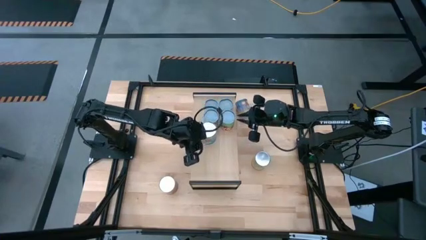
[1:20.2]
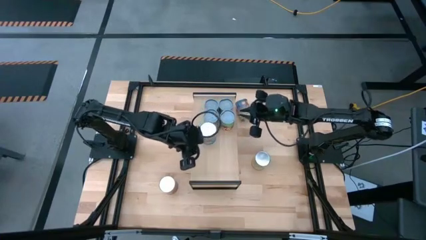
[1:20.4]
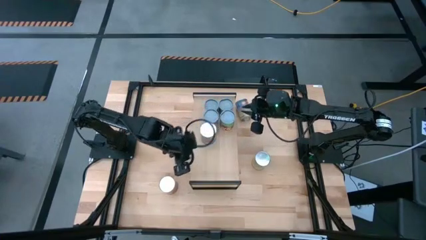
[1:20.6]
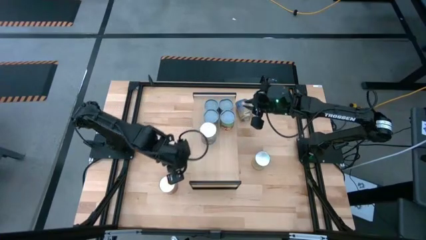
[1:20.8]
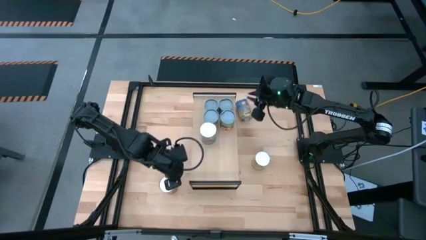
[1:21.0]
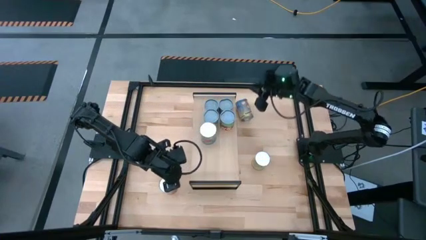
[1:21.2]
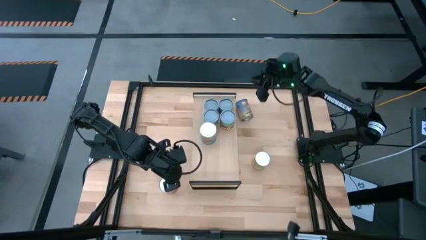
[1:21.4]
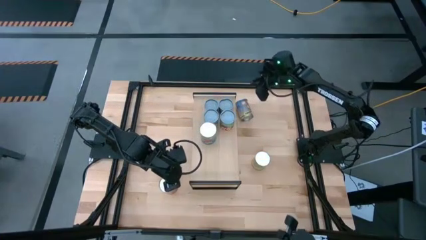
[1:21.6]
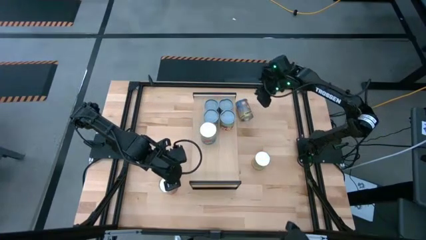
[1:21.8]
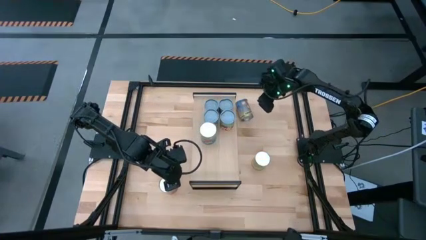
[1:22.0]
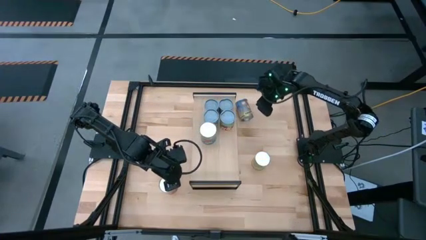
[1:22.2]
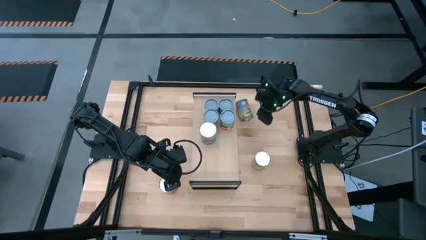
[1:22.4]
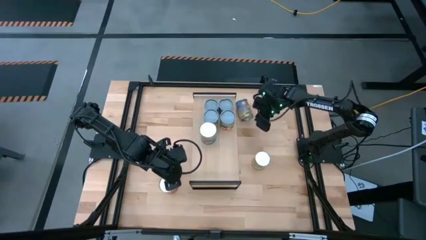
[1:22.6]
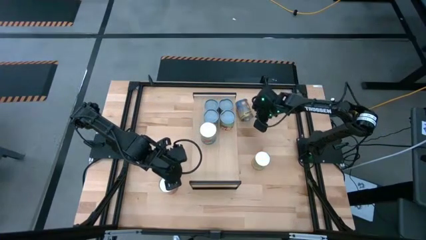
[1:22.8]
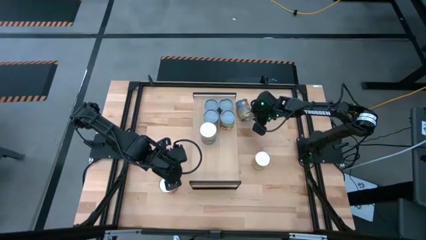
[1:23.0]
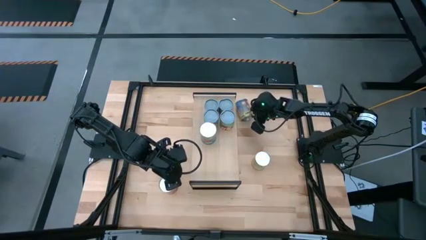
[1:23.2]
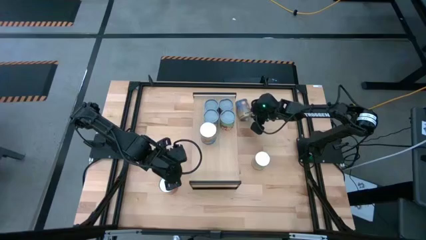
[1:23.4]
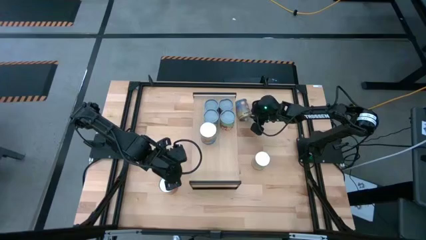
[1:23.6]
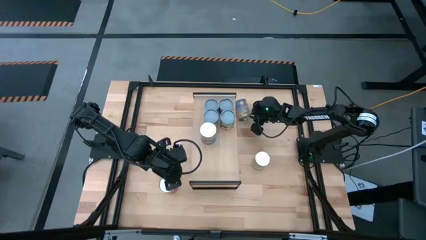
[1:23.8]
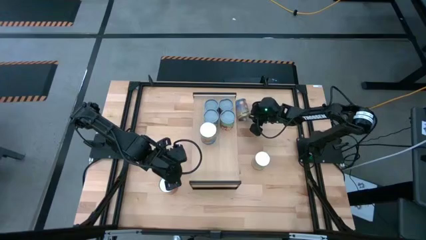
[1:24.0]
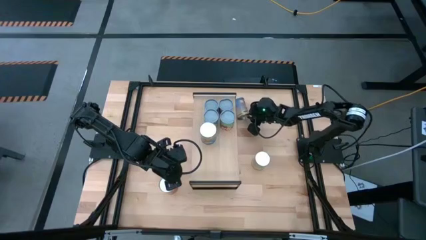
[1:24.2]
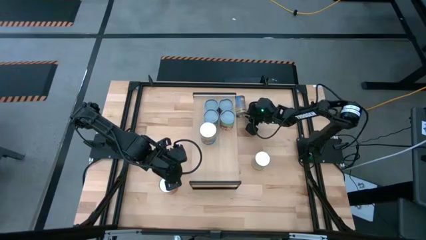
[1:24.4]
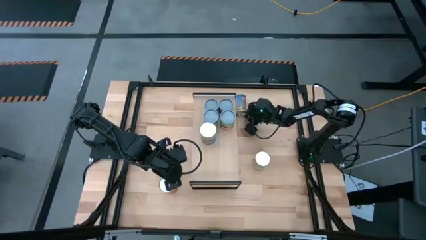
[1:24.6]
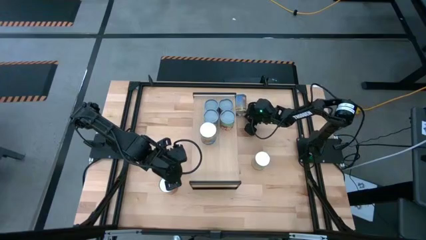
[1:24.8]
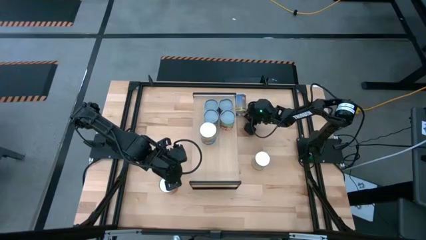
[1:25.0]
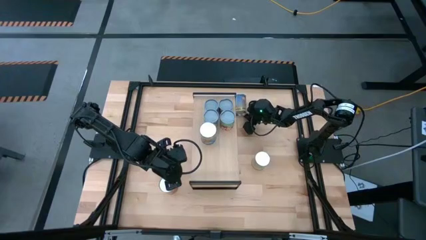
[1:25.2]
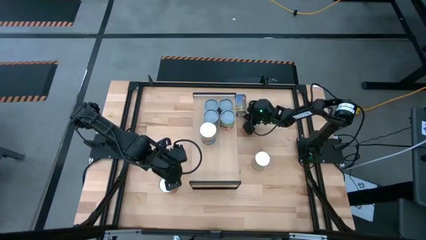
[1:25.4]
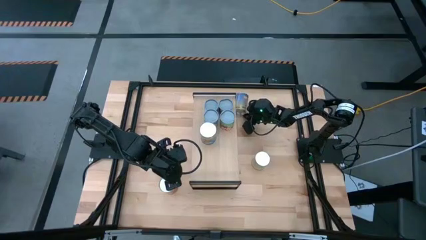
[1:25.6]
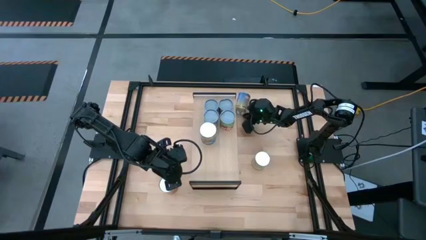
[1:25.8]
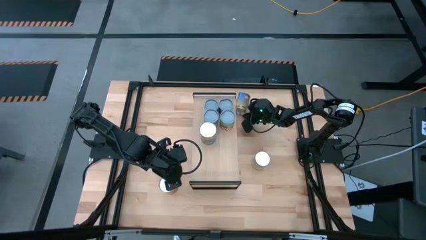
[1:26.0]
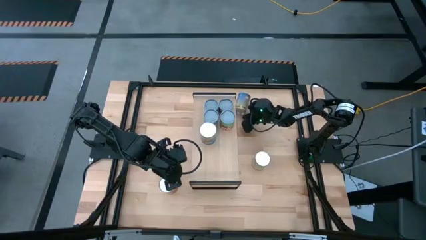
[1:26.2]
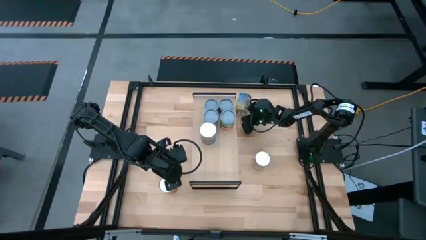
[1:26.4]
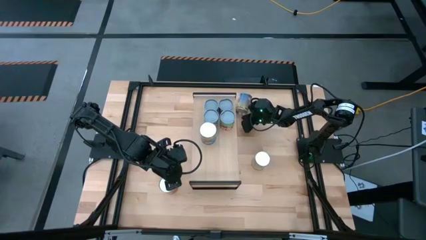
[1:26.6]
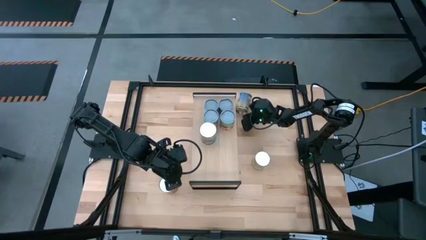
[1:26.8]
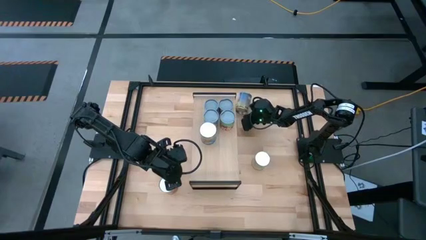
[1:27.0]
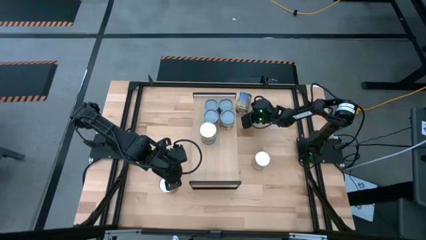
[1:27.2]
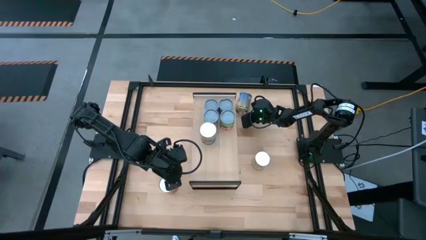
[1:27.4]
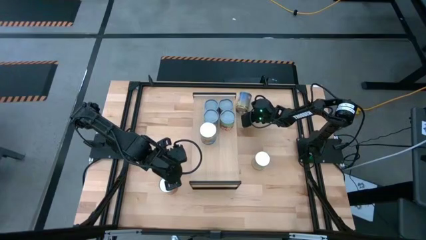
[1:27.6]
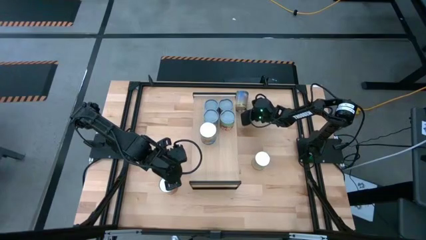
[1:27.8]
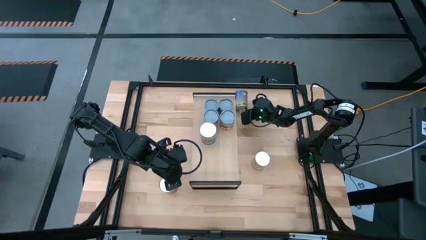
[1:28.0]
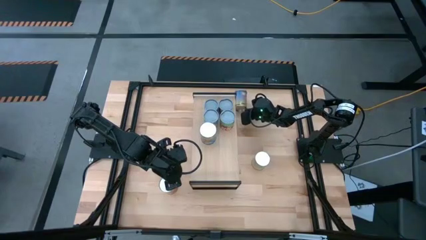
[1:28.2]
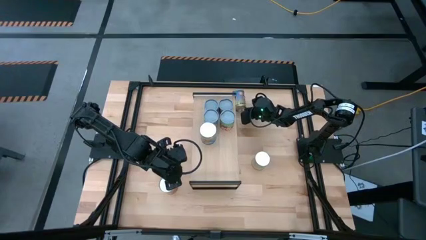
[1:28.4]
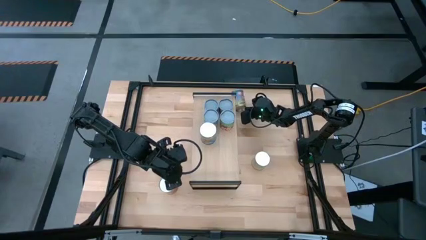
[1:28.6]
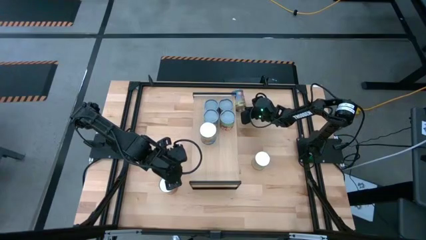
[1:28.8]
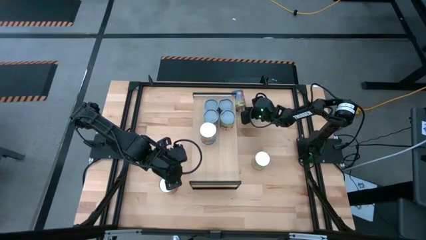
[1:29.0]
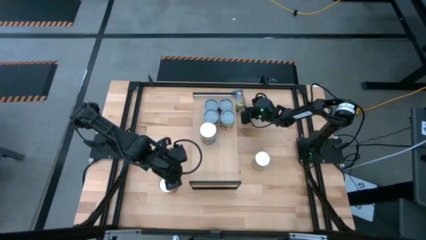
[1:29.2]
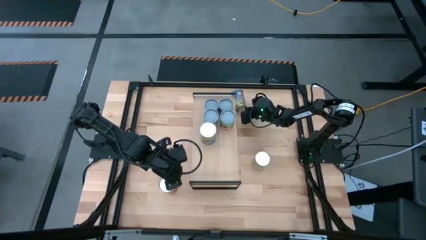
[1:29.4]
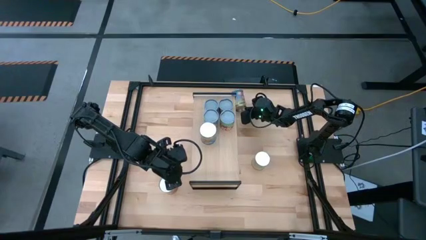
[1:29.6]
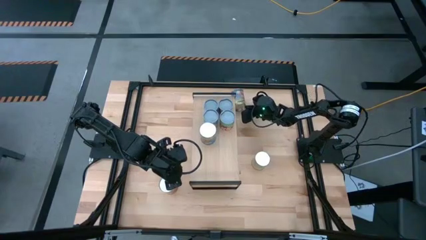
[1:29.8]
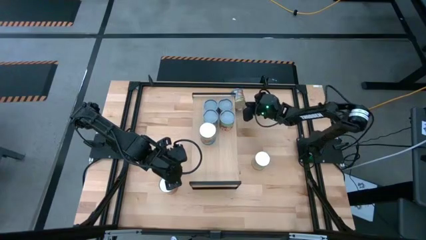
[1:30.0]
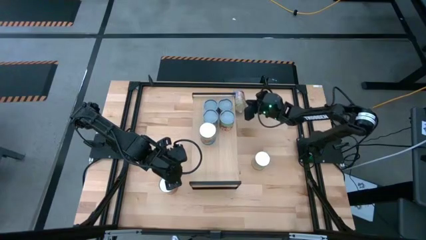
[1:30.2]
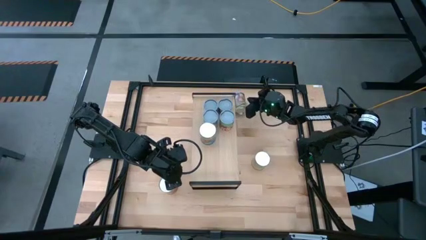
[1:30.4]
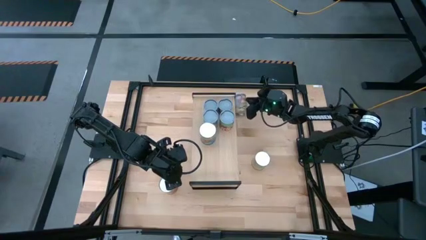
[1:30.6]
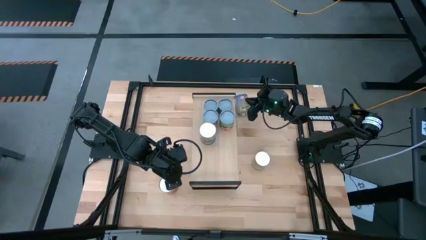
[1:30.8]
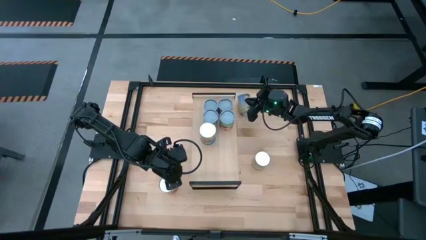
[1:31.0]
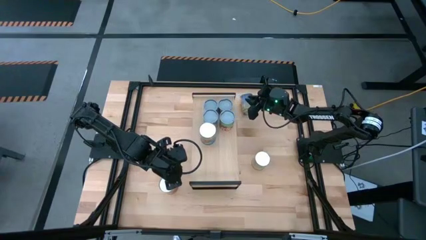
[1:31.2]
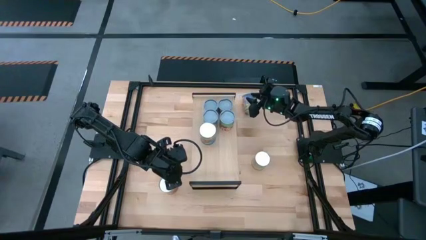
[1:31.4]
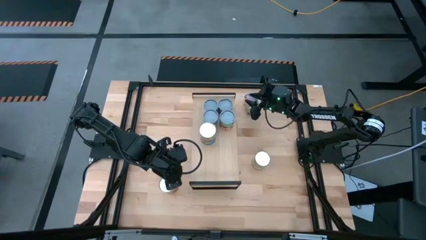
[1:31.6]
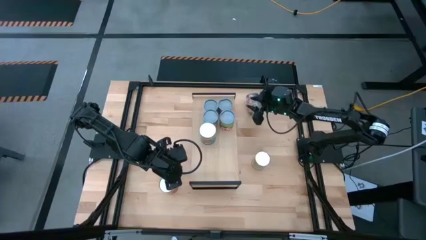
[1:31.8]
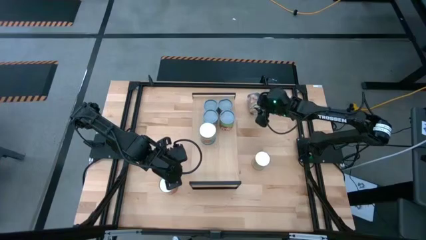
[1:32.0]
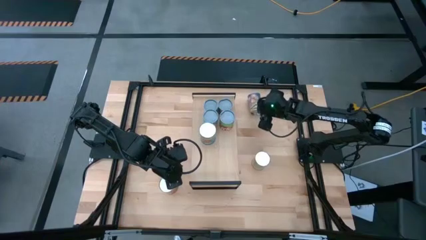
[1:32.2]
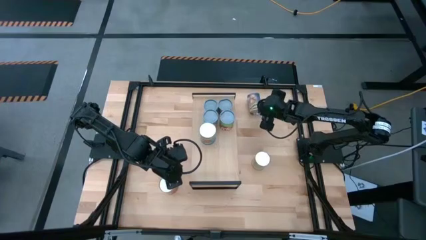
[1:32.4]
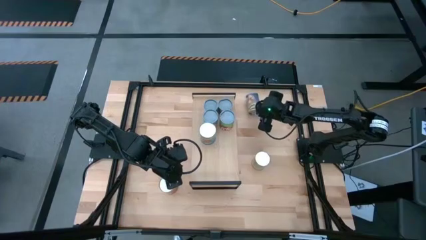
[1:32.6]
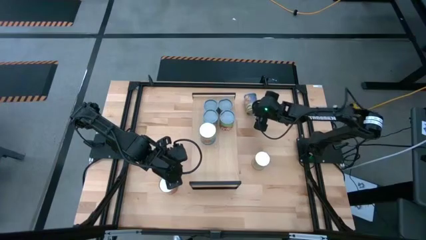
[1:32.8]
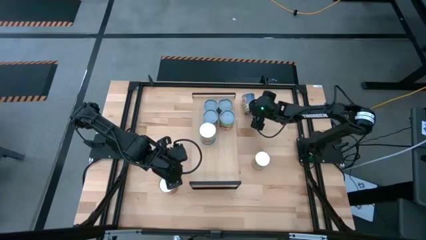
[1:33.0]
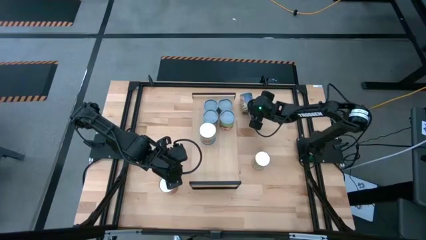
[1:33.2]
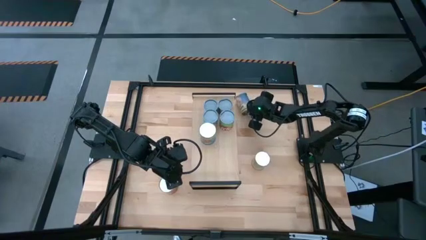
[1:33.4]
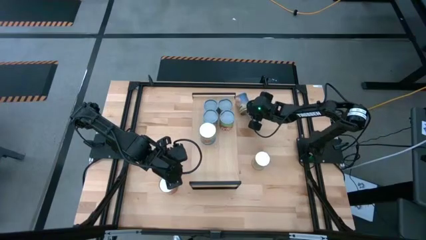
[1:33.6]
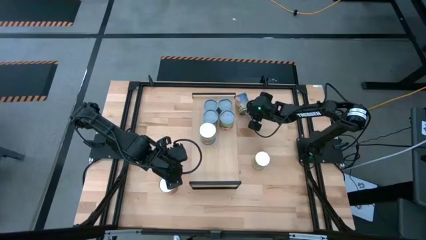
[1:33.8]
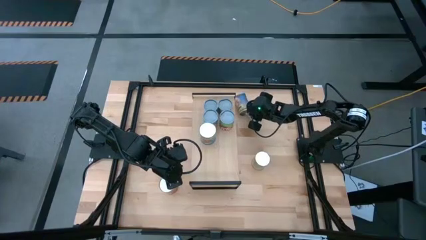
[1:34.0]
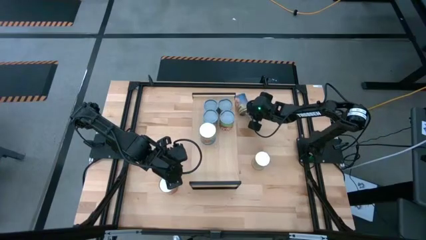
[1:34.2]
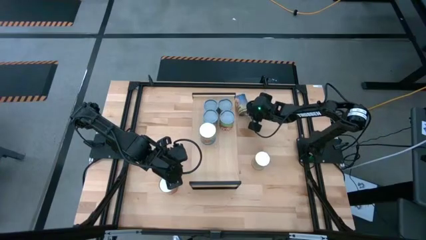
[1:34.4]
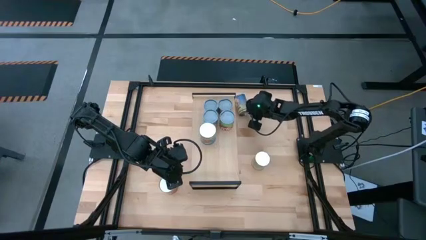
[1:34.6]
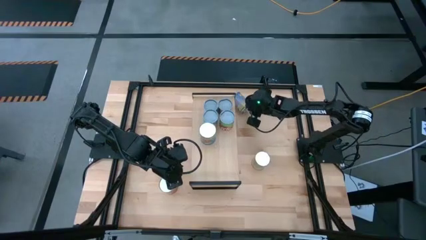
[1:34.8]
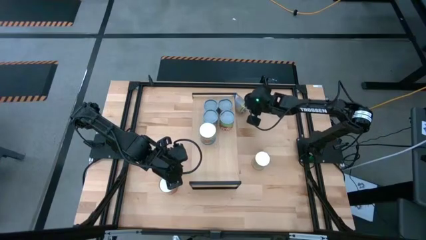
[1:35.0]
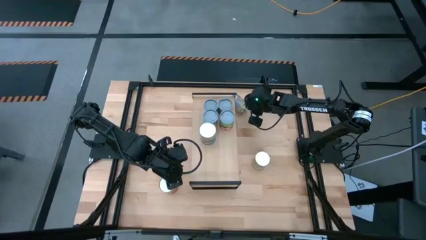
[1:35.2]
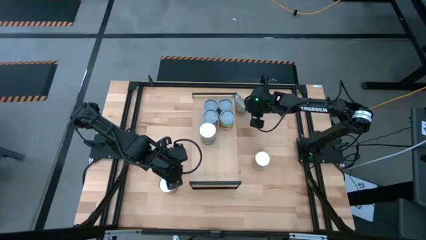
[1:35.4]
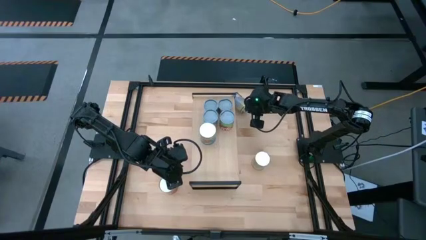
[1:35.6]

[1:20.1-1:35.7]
Task: Pick and place cans onto a shelf
Put the canned peaches on the shelf
